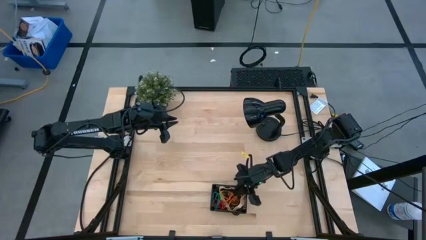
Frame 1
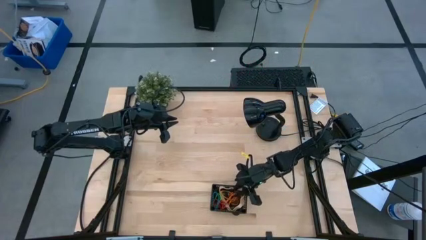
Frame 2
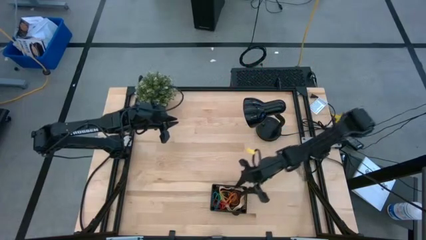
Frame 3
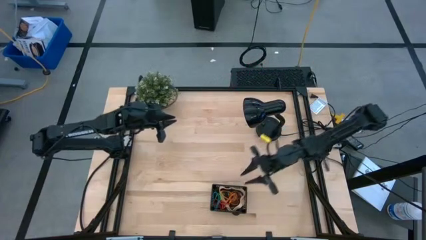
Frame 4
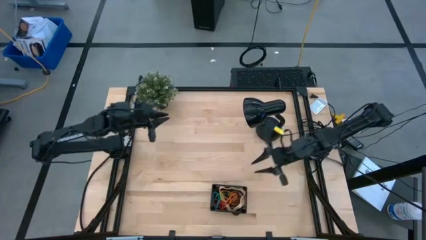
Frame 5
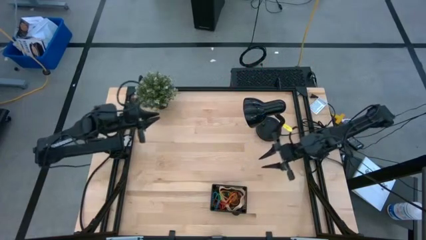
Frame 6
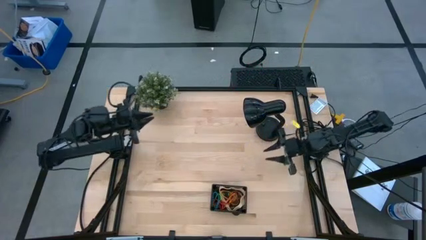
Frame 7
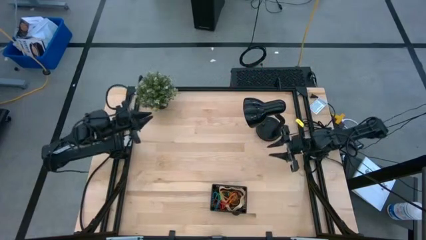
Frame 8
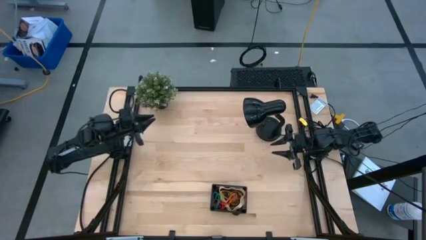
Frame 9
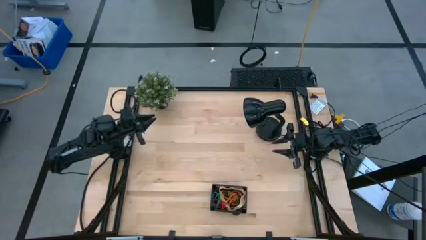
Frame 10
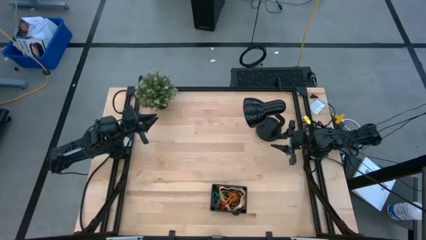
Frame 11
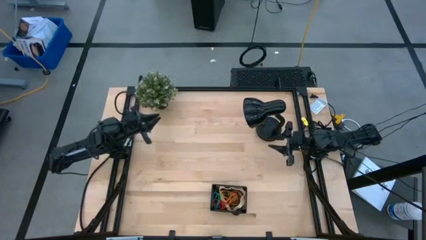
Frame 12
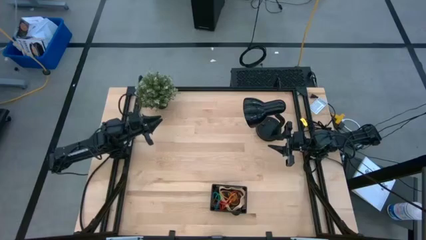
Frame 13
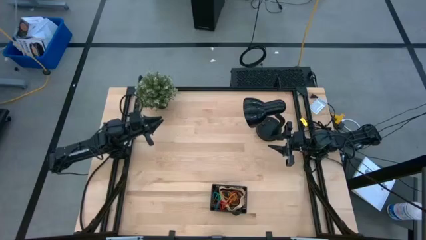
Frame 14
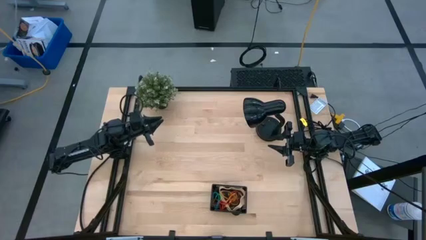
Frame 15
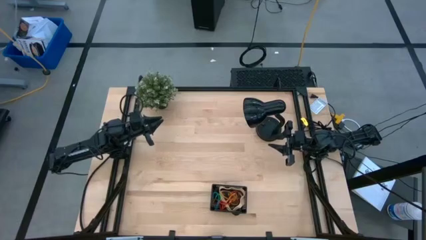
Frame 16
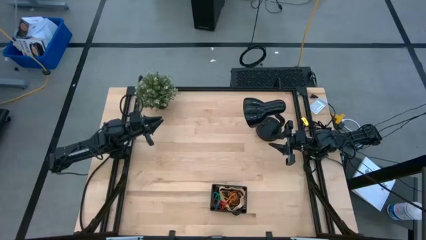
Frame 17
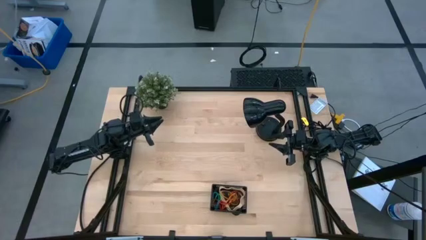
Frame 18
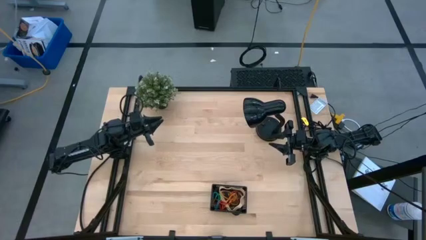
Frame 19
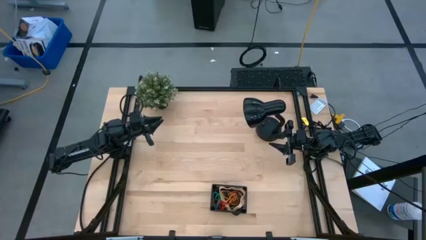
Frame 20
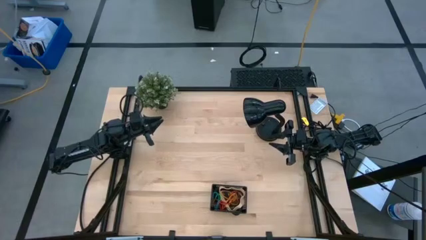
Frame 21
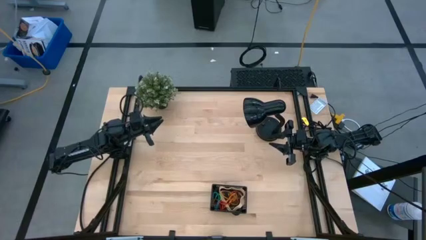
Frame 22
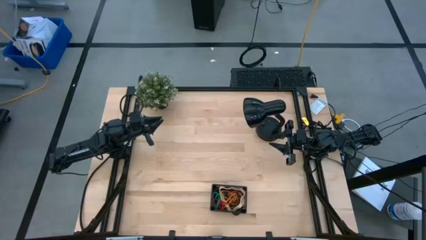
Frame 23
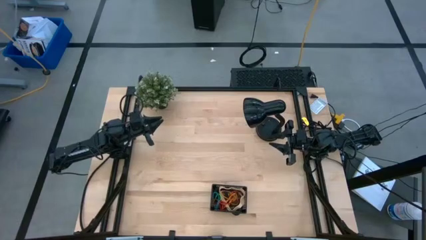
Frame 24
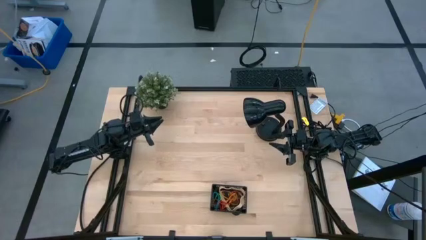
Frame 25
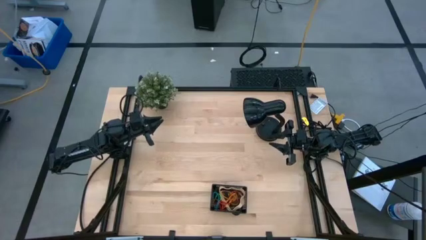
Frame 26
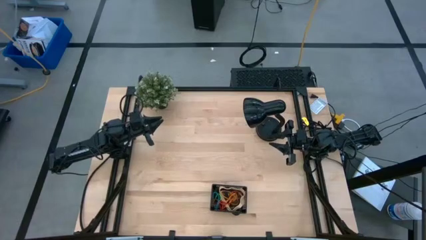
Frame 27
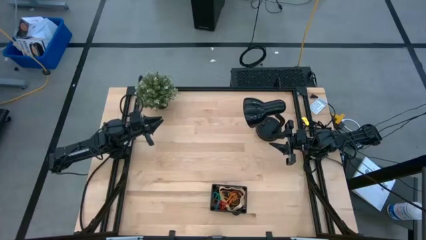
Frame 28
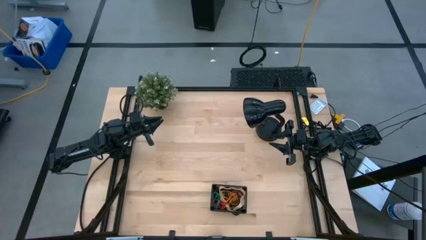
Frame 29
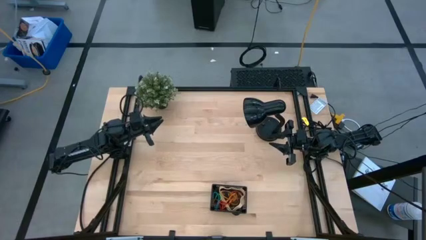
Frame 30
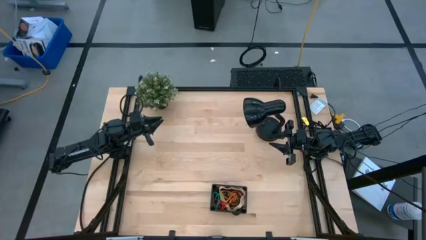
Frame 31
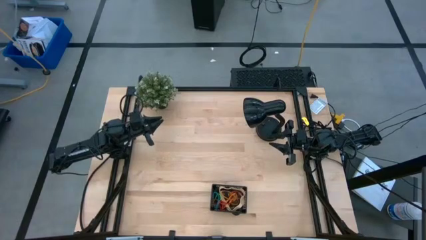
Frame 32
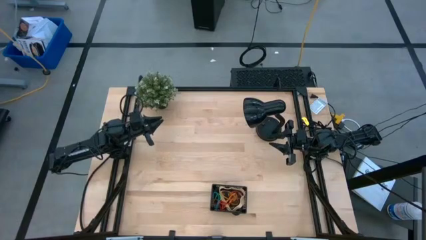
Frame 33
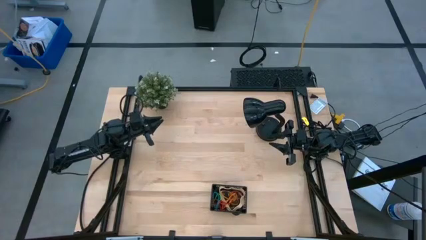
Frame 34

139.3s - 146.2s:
Task: Pick and place rubber bands into bin
Return to home position

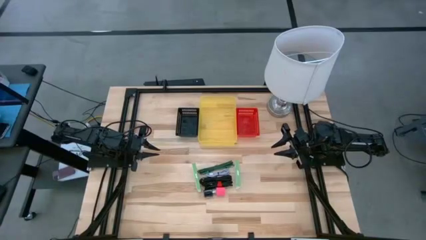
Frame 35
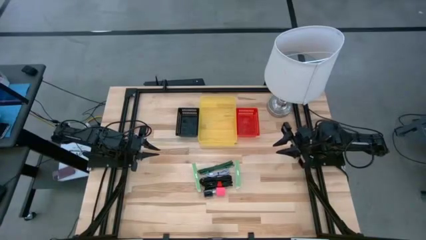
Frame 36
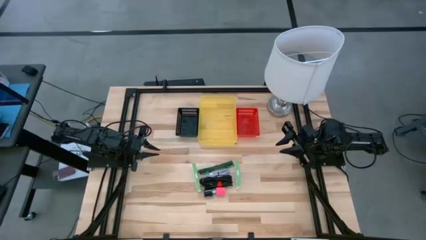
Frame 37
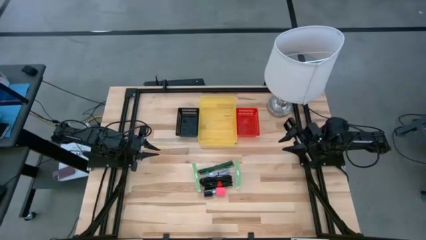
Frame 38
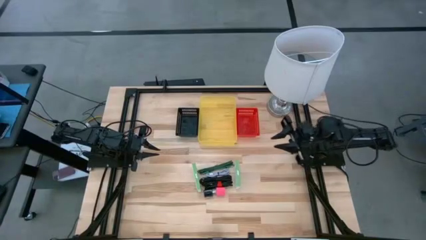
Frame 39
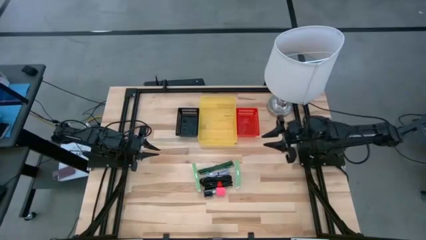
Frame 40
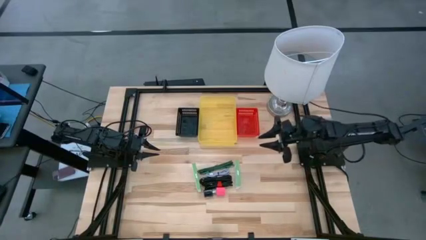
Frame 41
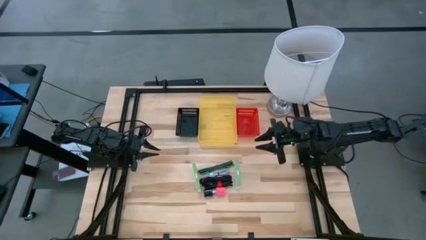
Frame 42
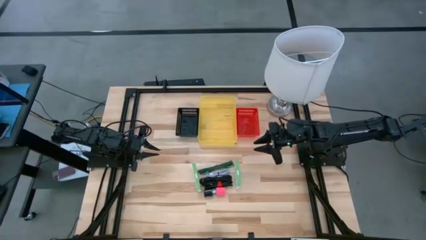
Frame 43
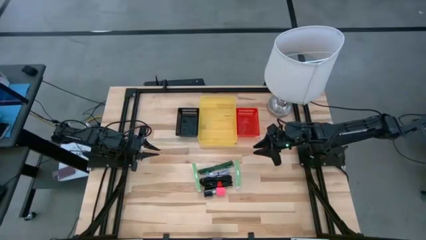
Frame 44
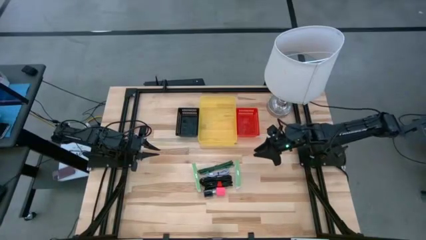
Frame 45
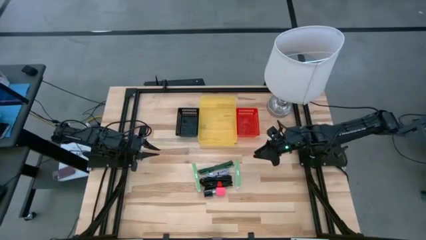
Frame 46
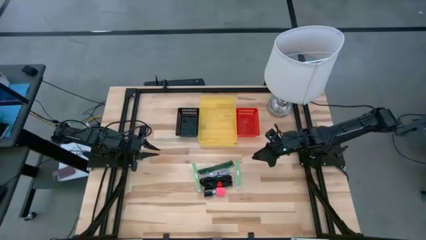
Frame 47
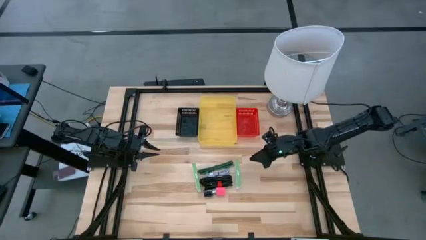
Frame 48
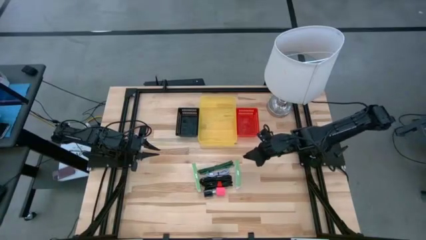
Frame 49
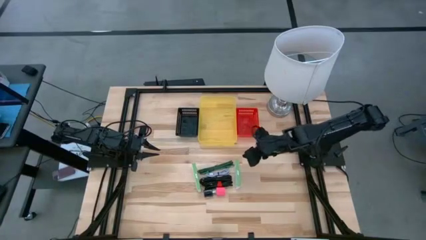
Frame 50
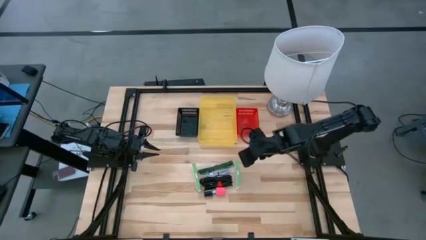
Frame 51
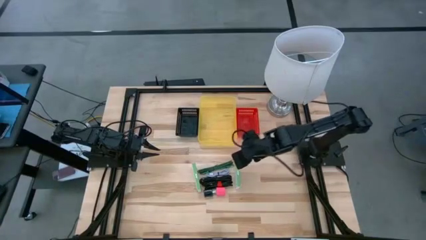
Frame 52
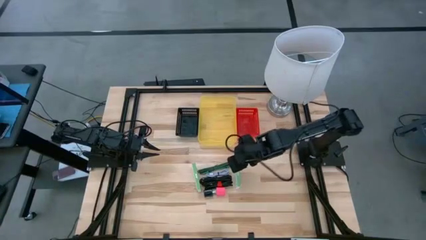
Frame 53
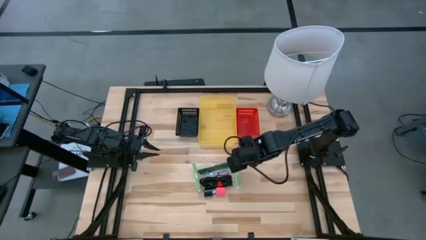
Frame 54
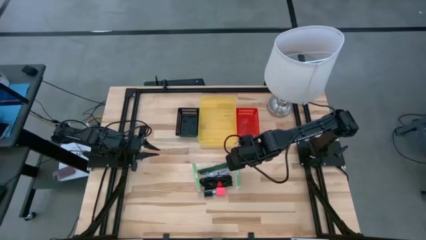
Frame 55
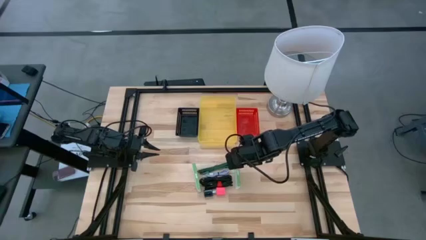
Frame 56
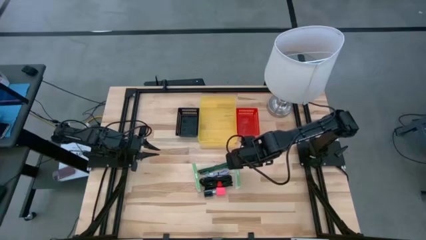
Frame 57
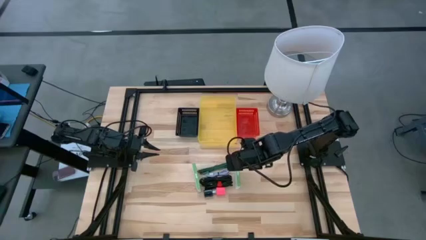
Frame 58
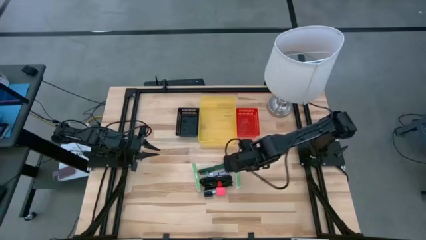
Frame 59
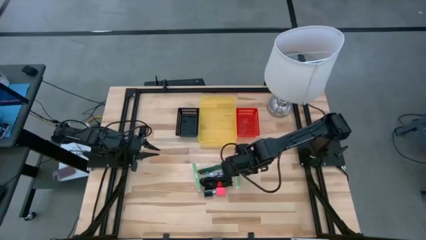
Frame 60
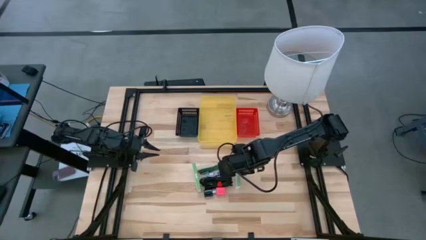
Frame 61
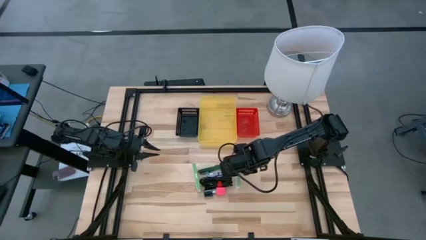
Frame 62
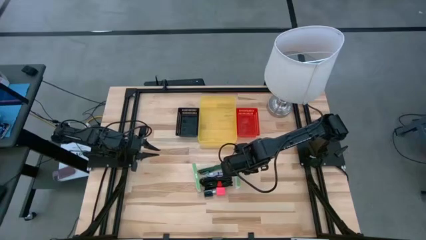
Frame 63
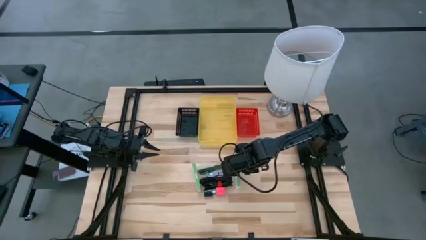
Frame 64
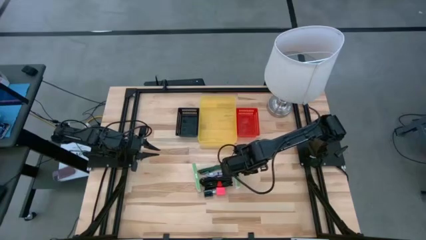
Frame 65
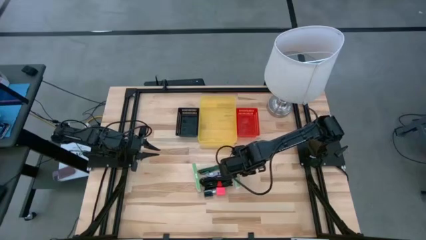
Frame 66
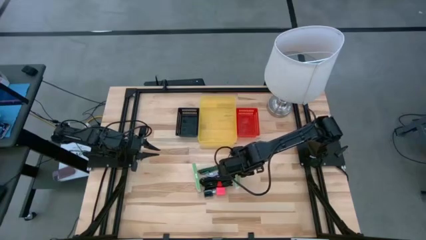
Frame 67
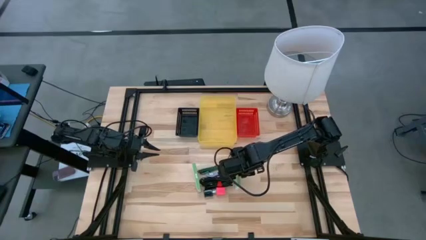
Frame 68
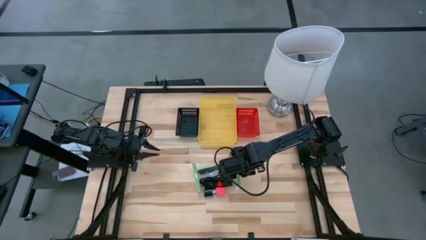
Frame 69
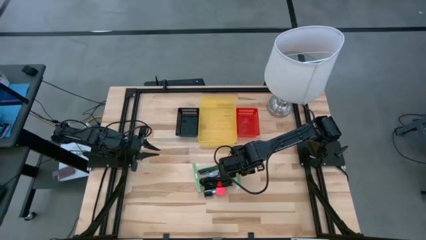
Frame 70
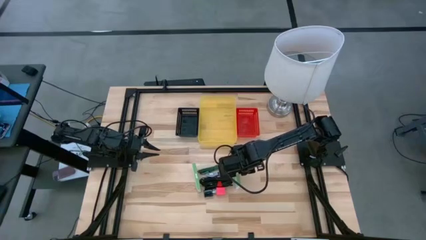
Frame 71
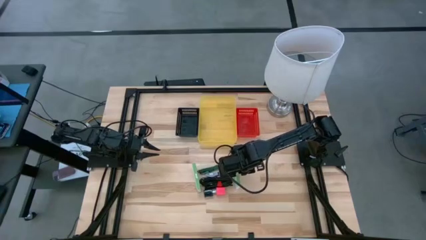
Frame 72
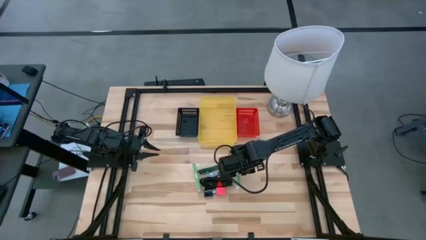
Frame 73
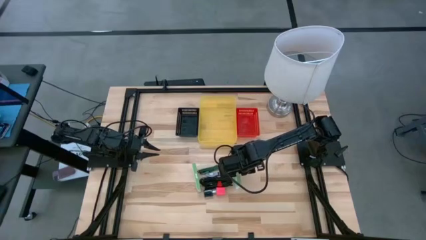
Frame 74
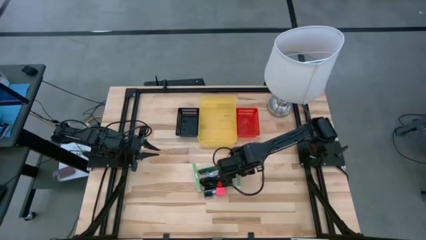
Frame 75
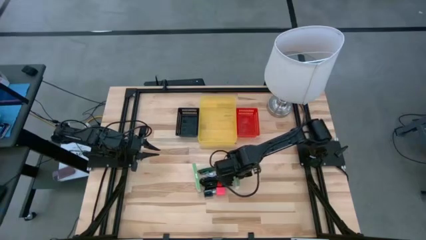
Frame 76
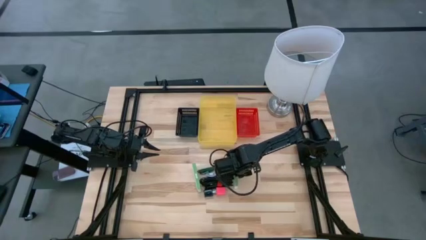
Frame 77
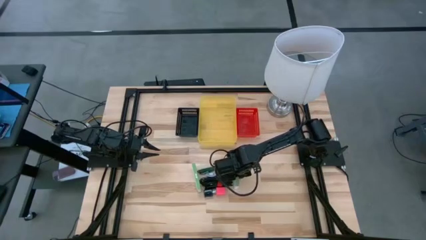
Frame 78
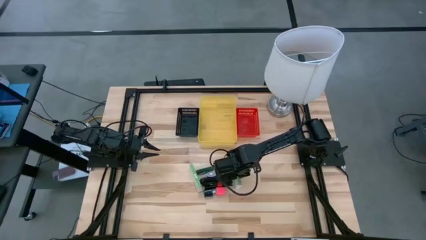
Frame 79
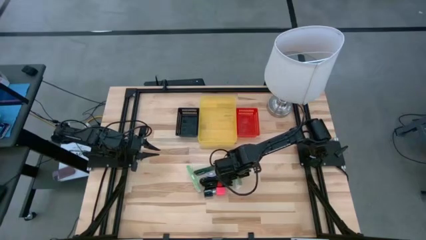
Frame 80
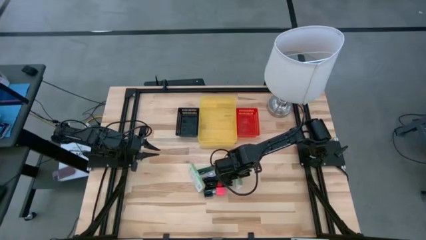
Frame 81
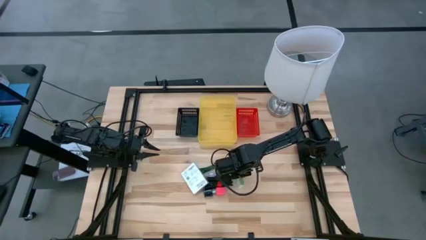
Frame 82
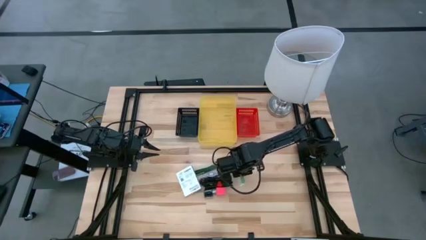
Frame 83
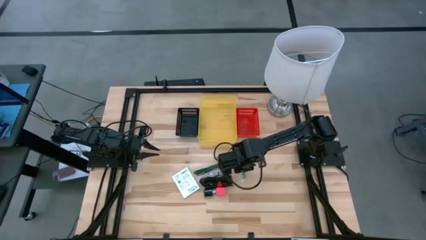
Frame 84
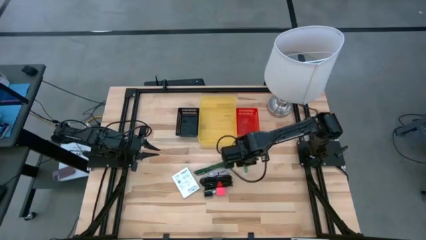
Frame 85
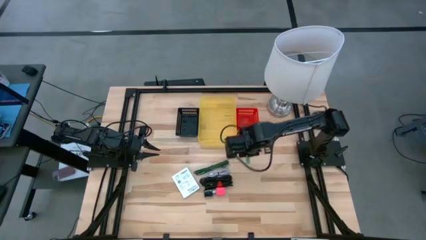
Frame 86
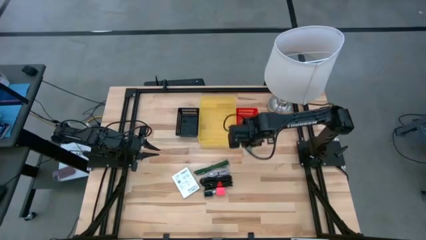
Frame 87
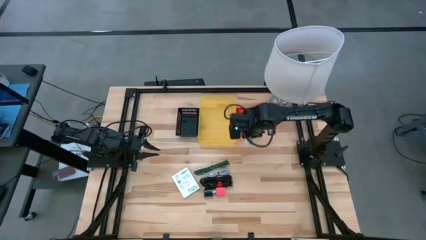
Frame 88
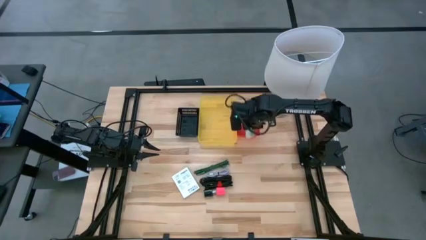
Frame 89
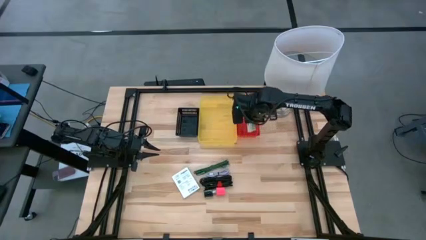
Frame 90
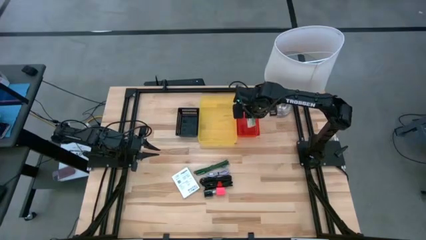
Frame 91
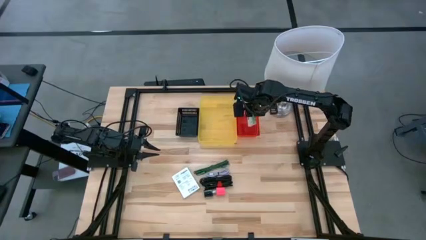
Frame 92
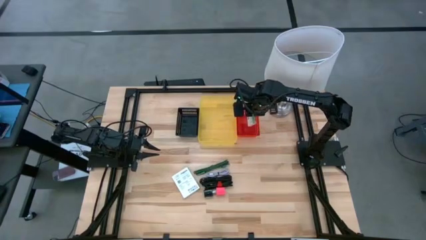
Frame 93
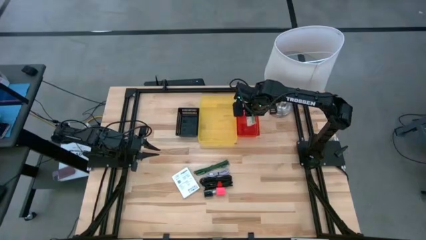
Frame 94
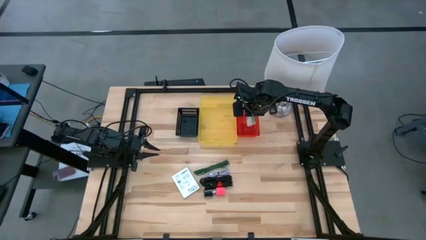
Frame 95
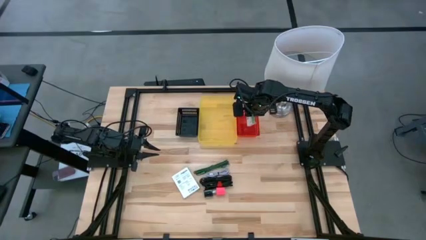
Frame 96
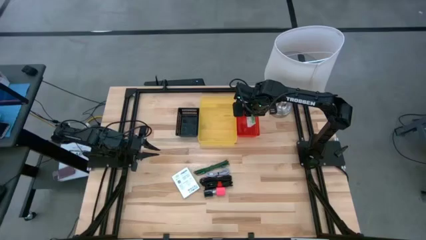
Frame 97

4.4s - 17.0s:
Task: Pick and place items into bin
Put the white and green card reader box into the red bin
